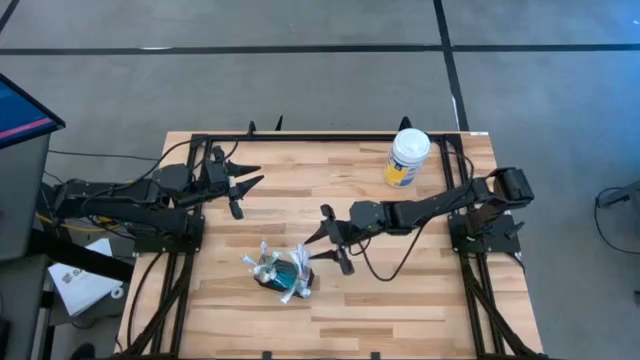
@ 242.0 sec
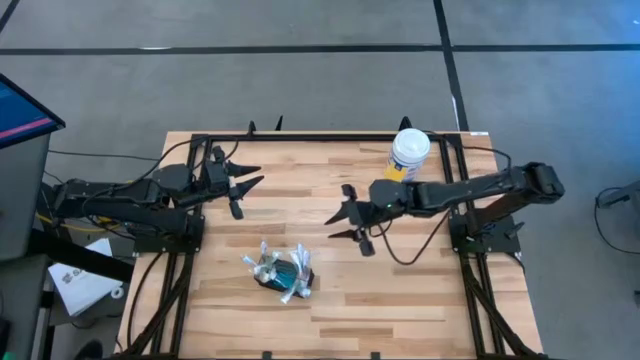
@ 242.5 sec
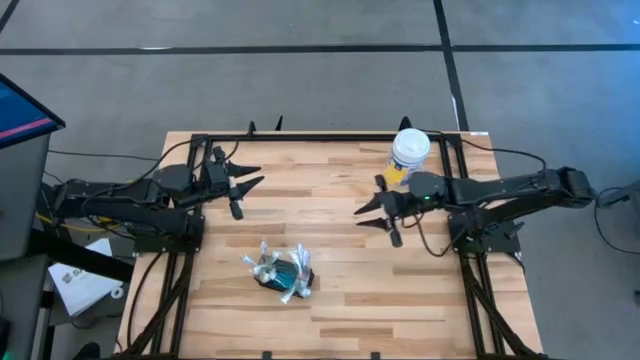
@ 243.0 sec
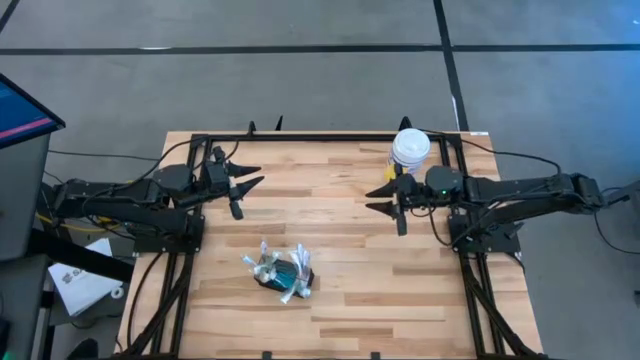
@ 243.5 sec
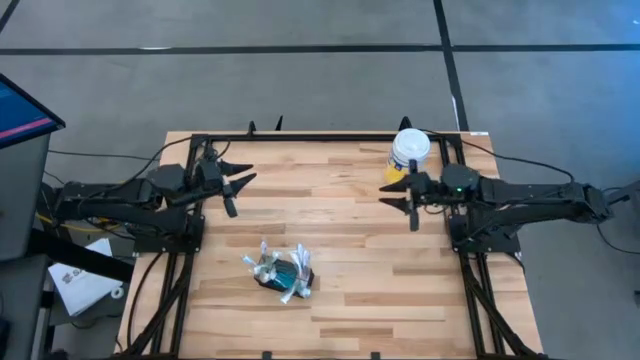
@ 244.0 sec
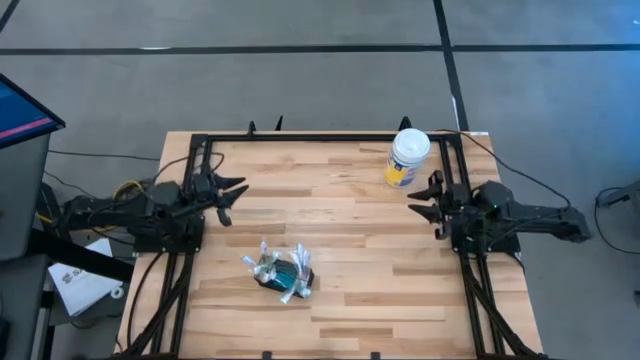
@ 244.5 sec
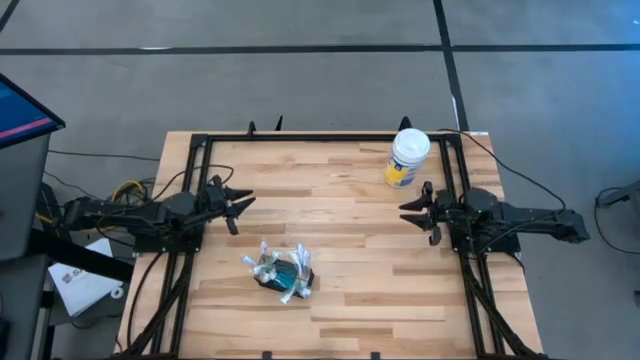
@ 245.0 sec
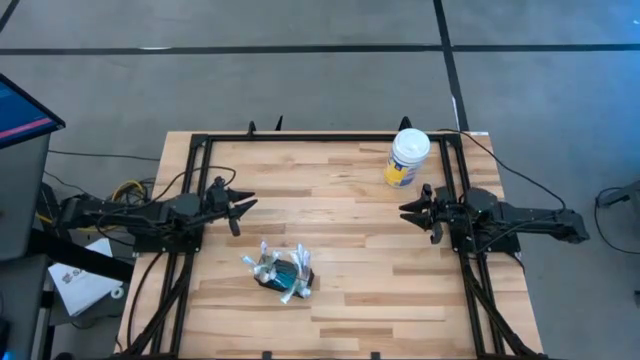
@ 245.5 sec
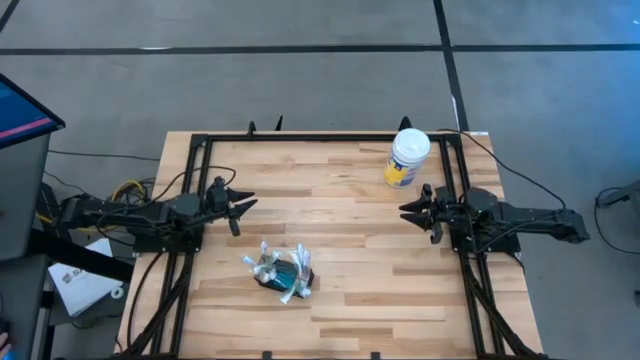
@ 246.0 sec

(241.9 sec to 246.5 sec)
Task: Pick & Place toothbrushing station
Return to Home Position

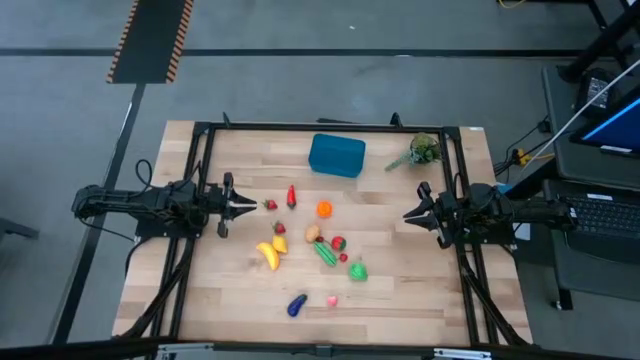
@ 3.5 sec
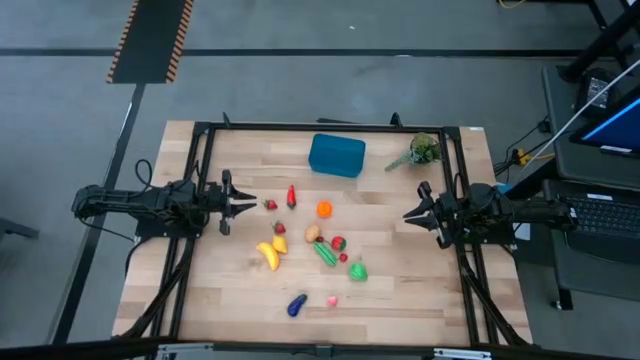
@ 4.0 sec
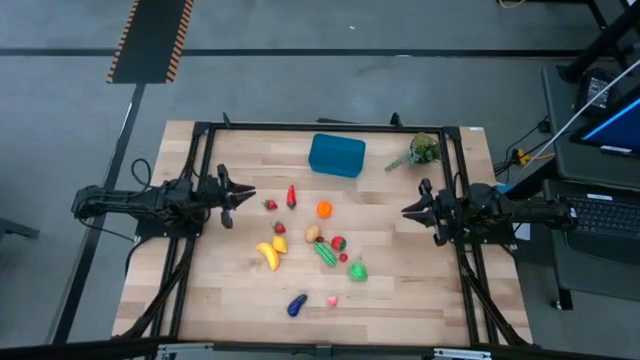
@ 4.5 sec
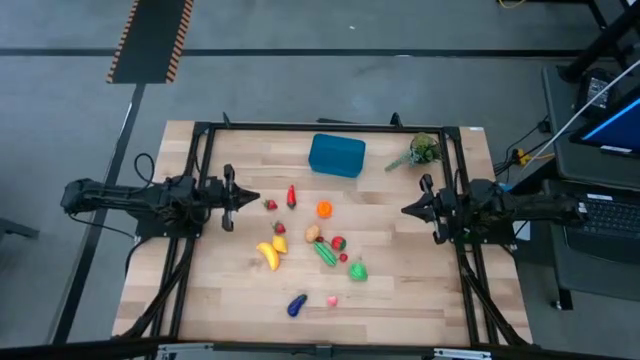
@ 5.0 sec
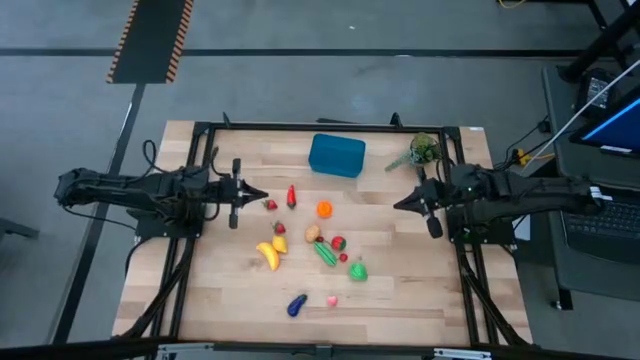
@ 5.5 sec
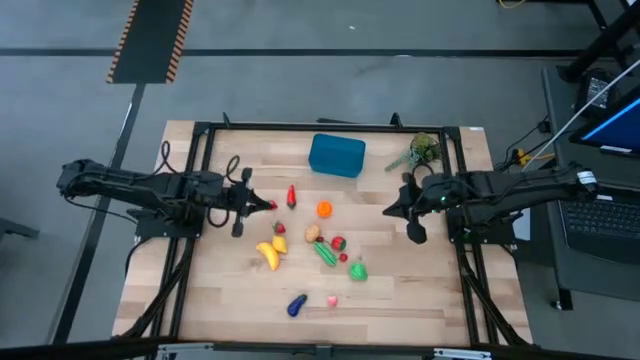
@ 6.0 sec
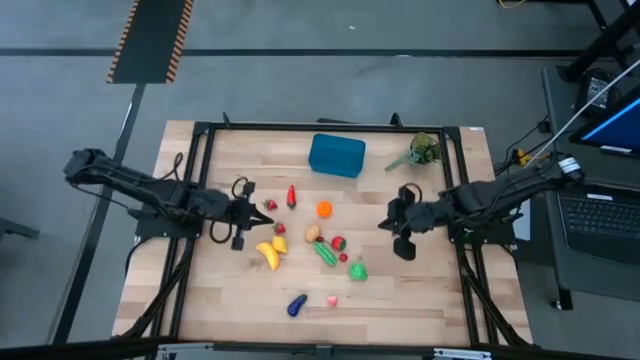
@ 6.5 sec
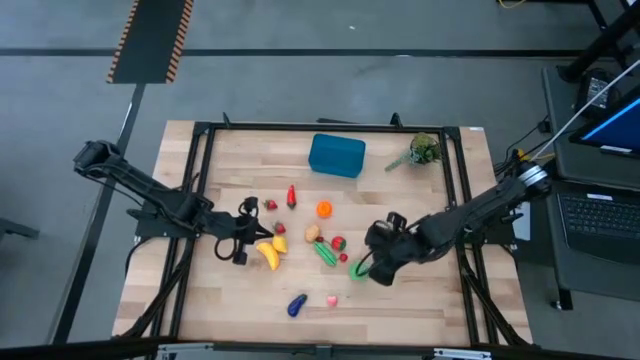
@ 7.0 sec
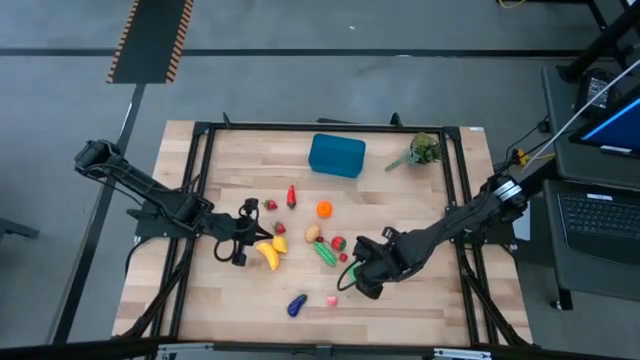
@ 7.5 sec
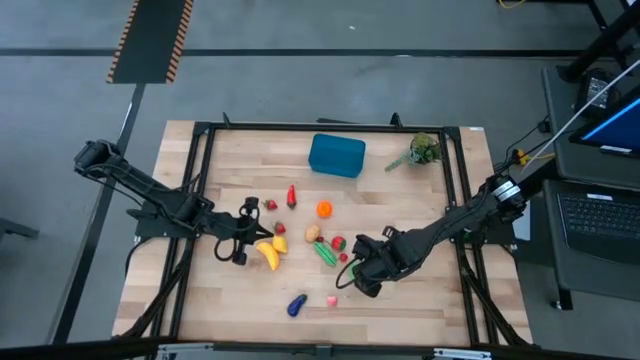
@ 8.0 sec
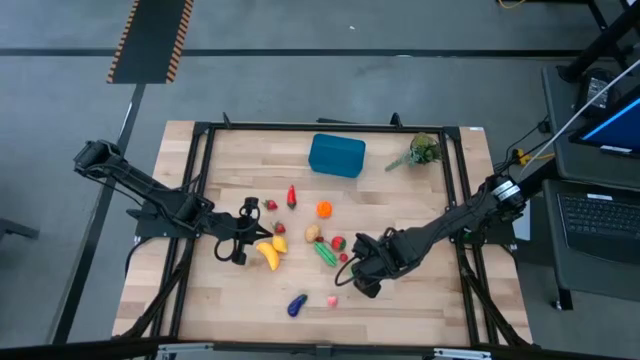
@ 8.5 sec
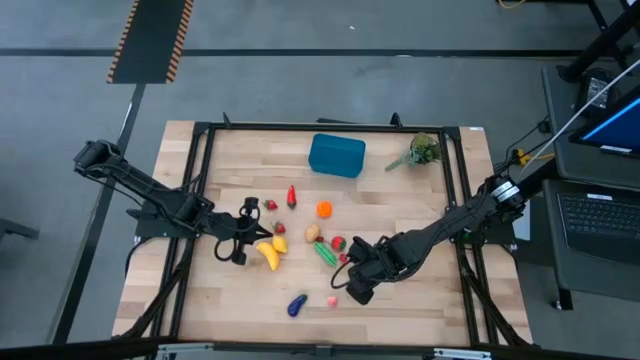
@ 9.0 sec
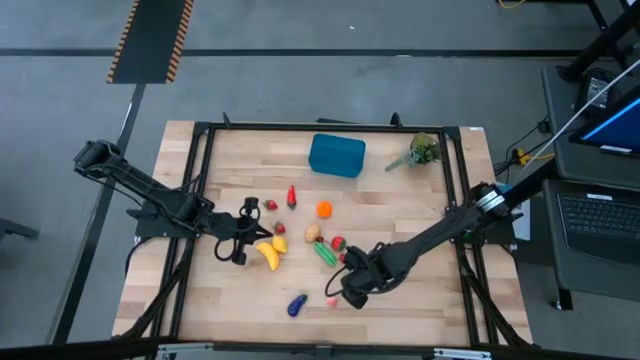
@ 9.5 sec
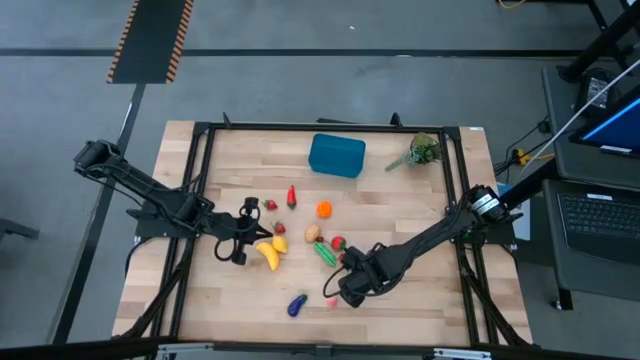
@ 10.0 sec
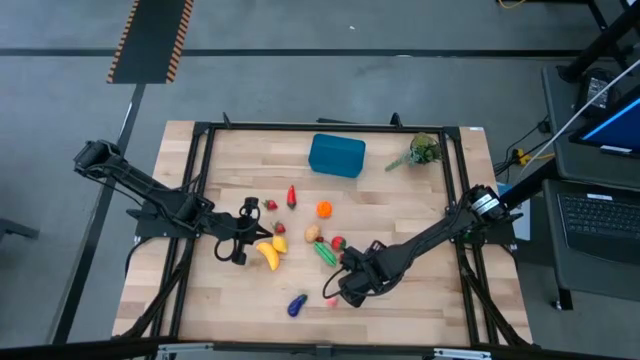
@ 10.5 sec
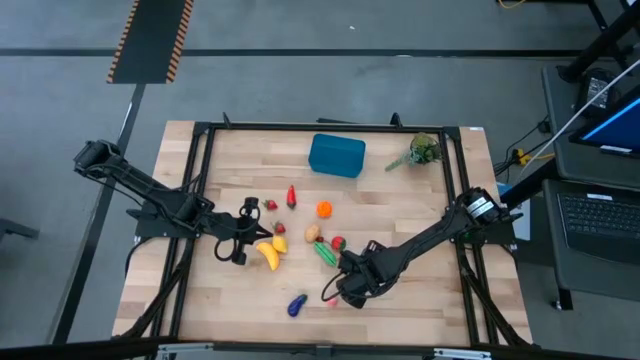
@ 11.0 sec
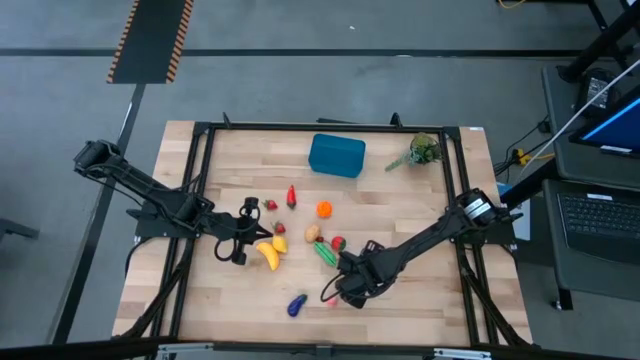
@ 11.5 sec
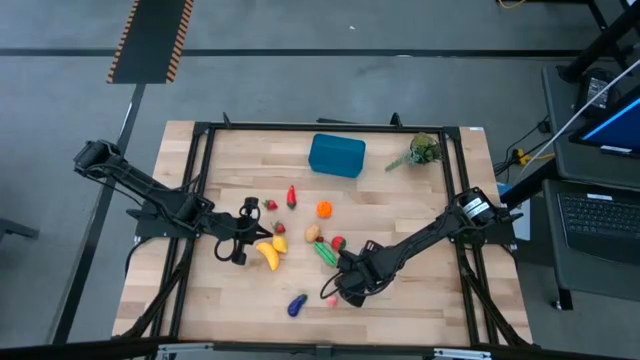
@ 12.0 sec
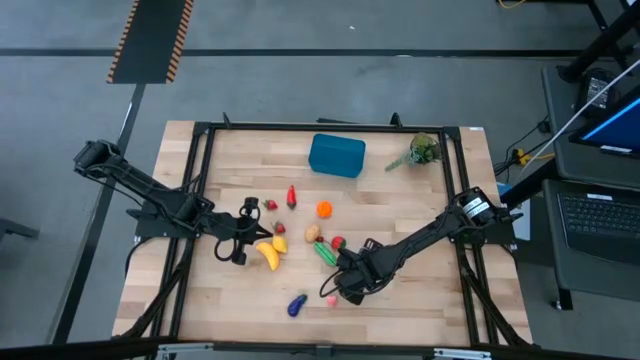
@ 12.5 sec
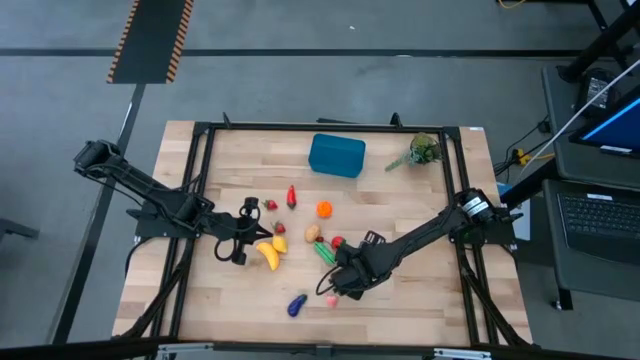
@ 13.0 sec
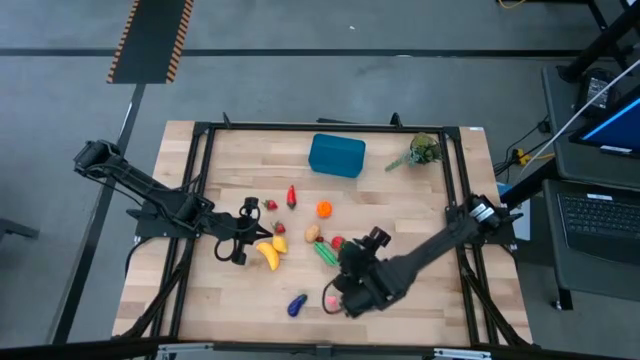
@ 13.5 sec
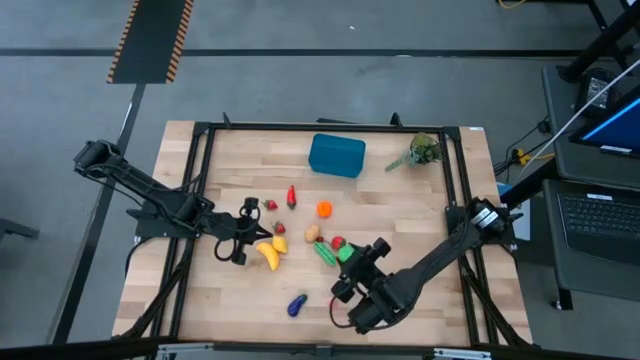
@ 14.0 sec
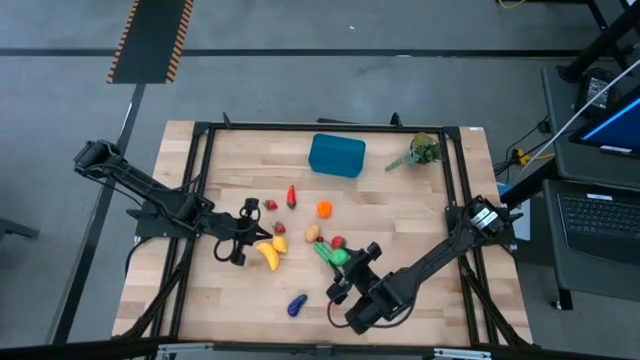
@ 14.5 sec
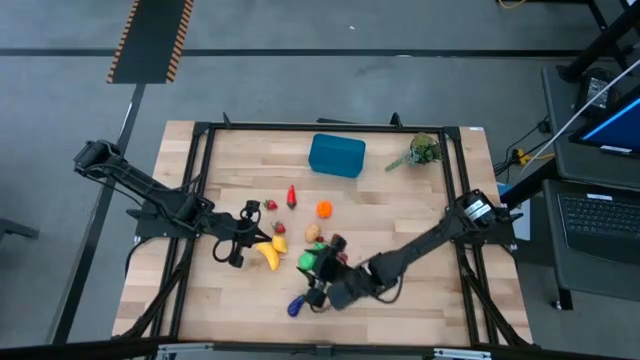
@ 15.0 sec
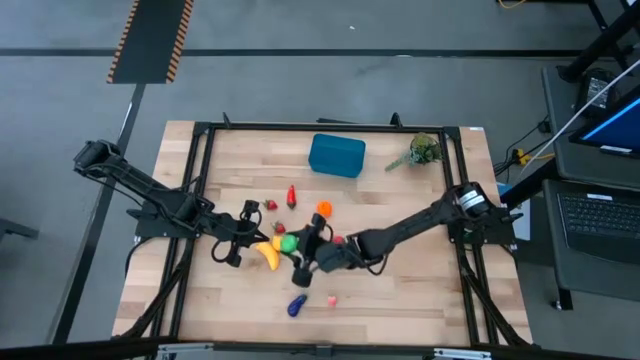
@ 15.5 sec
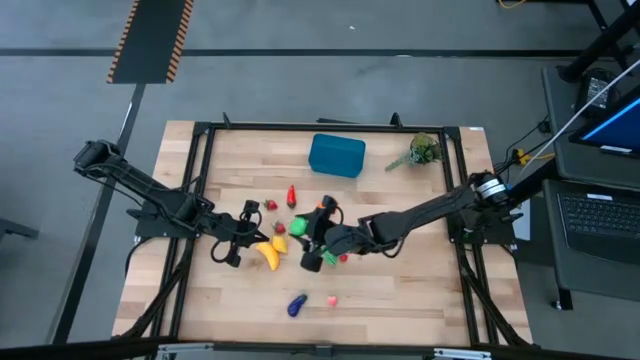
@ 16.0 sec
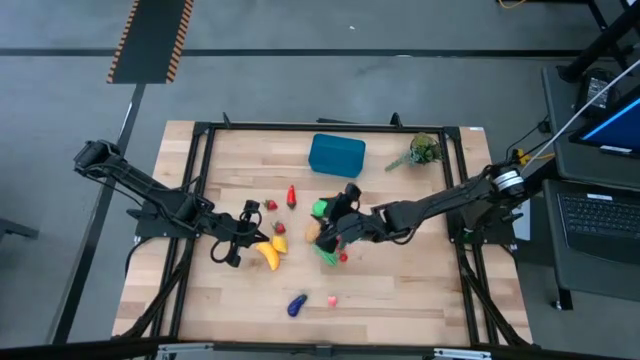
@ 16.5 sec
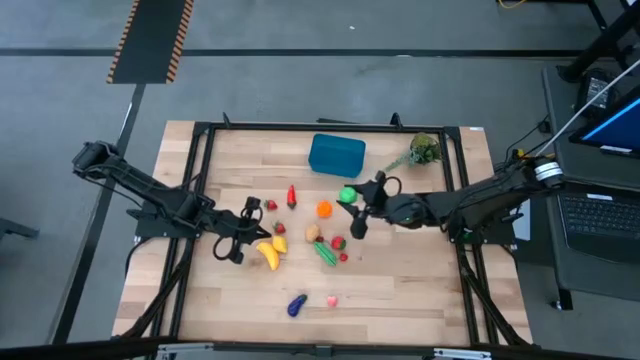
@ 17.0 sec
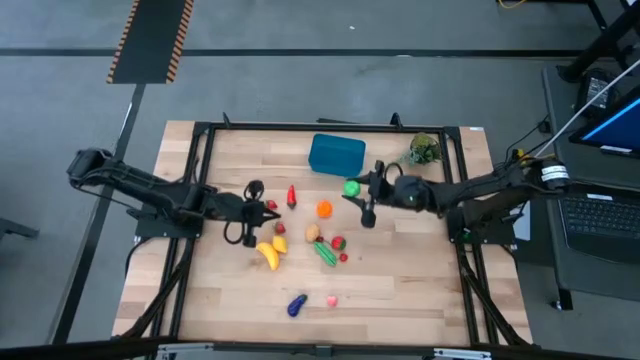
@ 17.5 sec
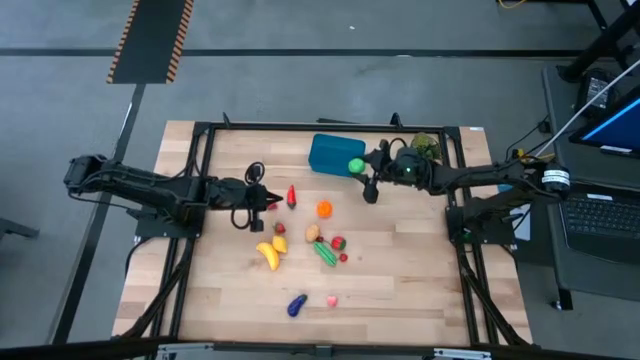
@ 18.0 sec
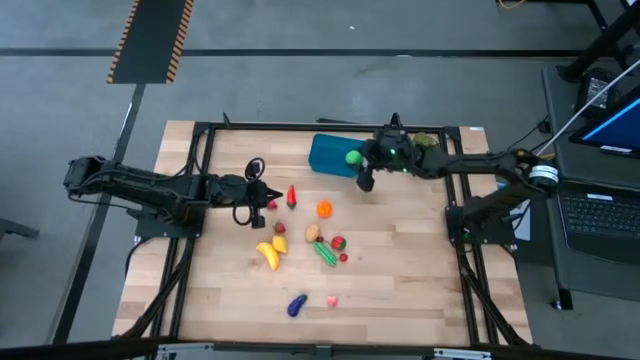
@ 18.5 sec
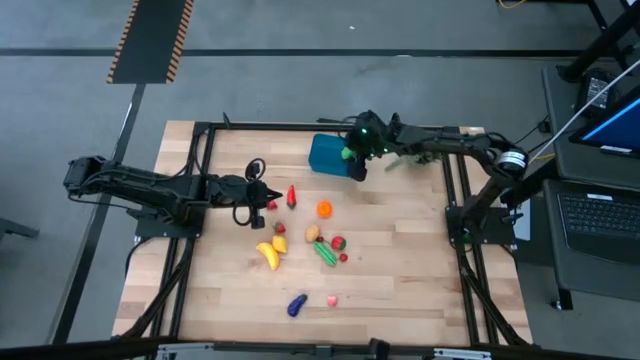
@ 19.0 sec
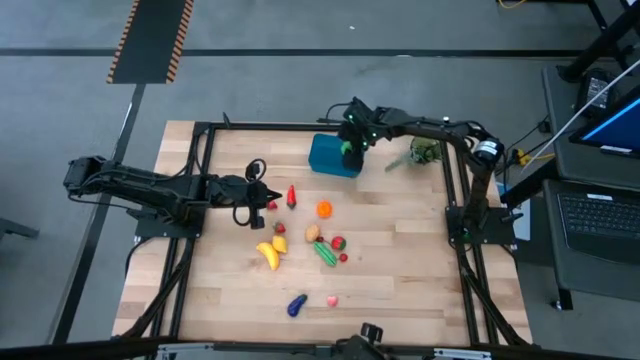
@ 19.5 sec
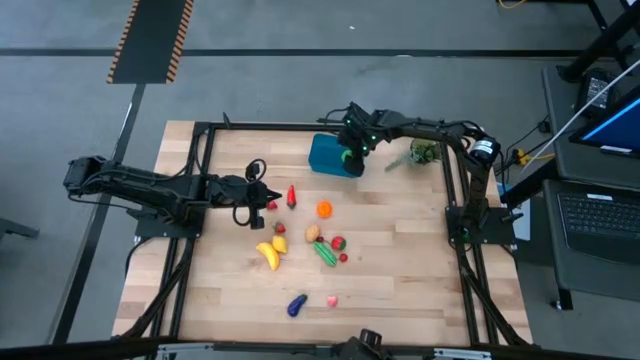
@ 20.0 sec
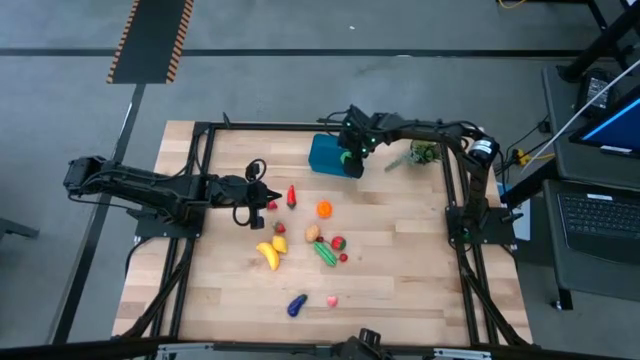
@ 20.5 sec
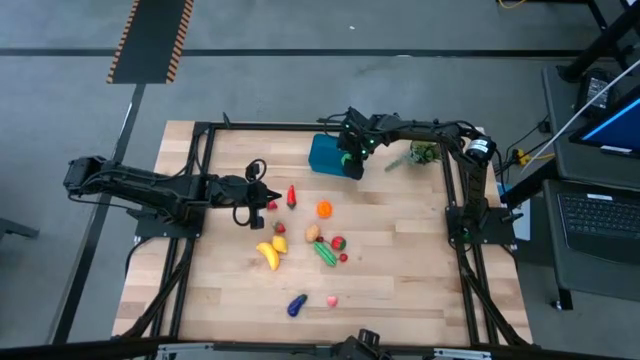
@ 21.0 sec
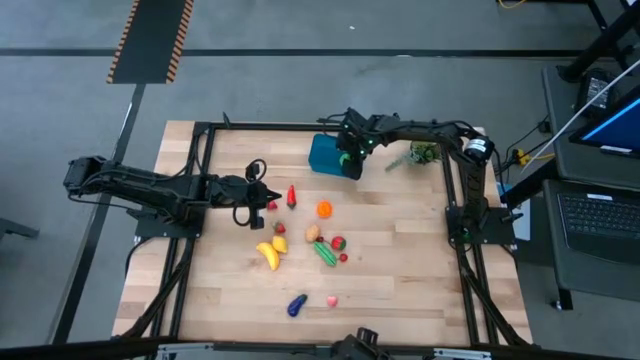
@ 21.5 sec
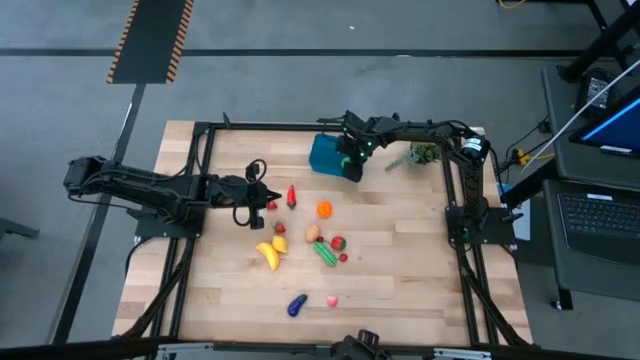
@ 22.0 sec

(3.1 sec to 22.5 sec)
Task: Pick and placing Produce into tupperware
Put the green pear into the blue bin
